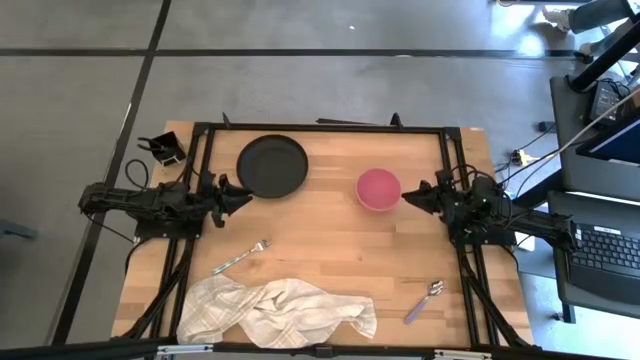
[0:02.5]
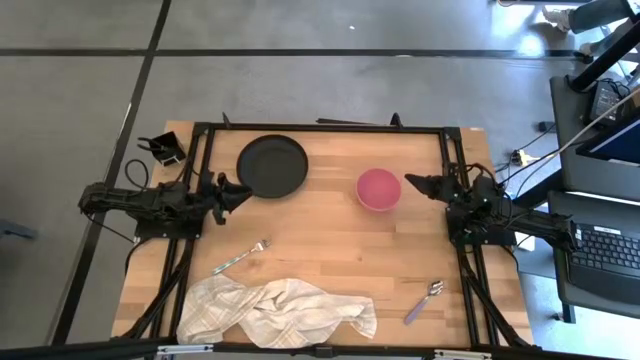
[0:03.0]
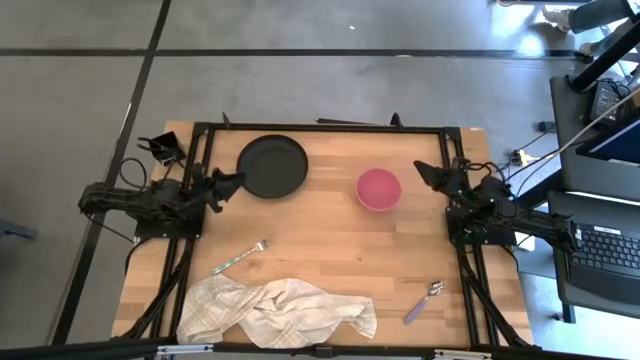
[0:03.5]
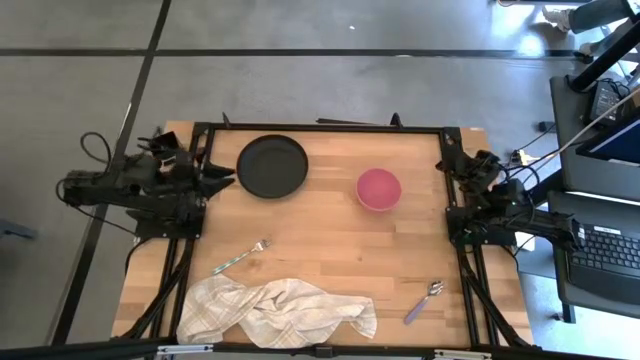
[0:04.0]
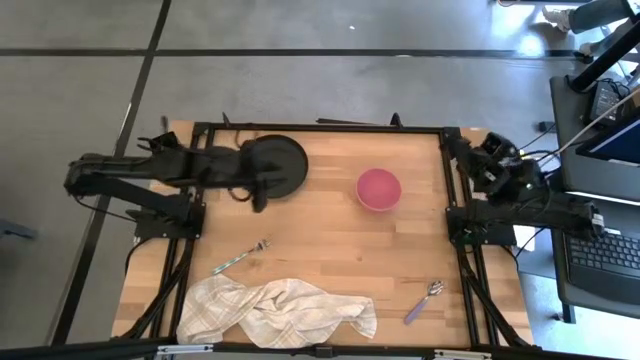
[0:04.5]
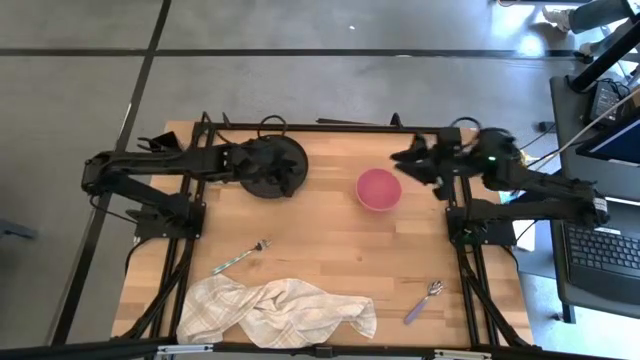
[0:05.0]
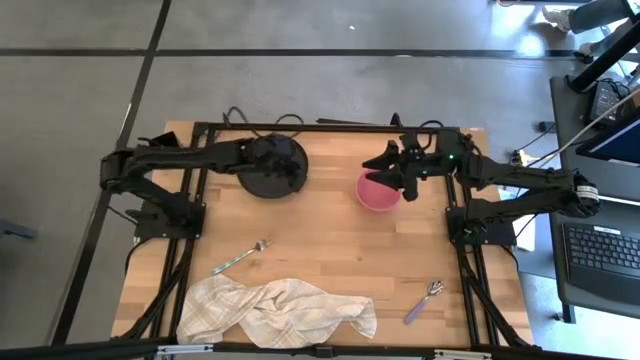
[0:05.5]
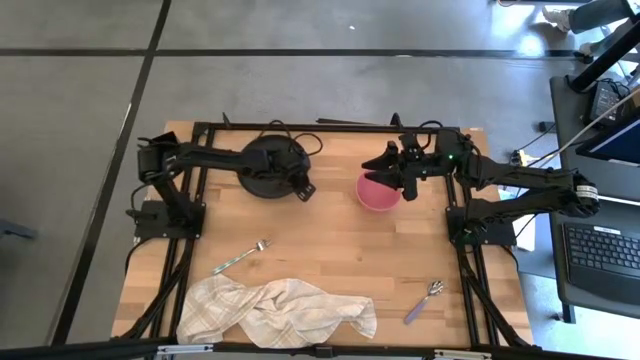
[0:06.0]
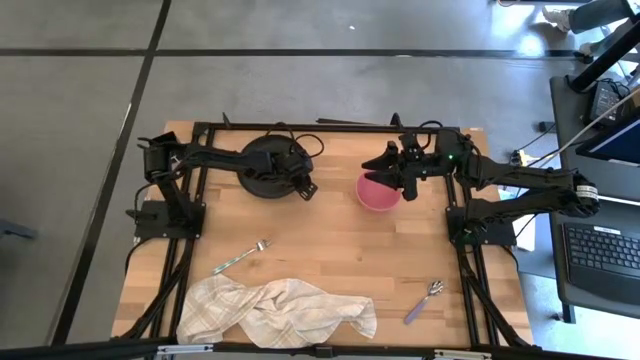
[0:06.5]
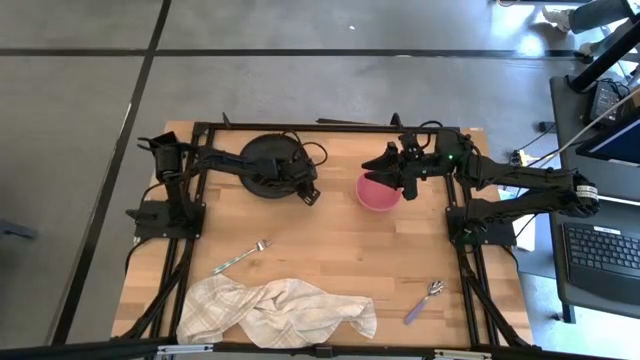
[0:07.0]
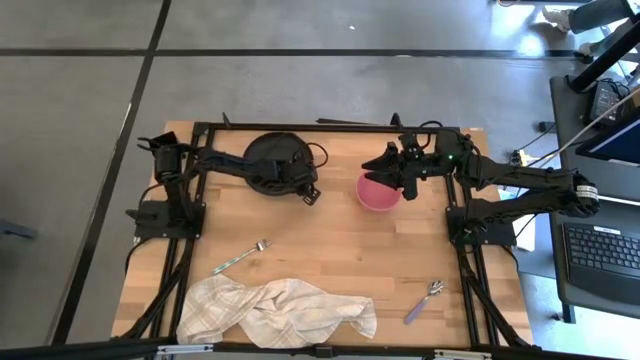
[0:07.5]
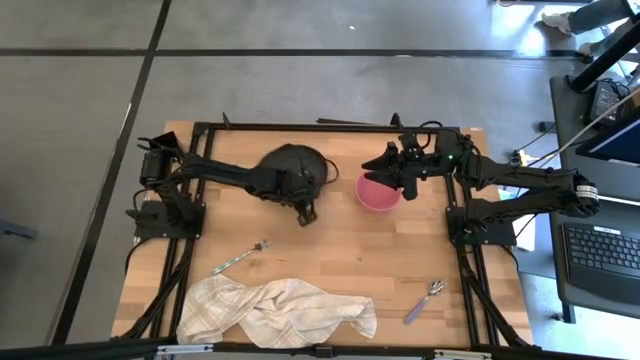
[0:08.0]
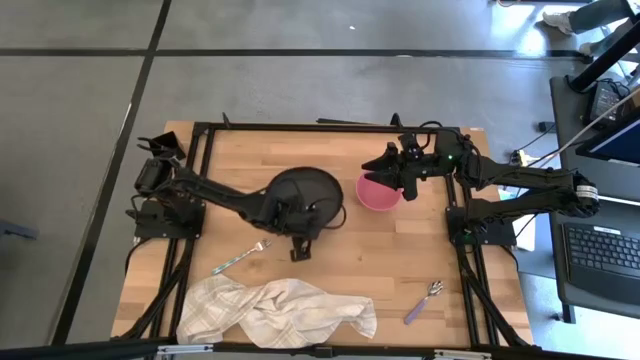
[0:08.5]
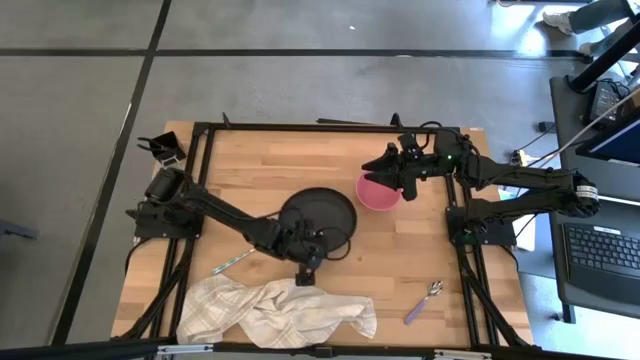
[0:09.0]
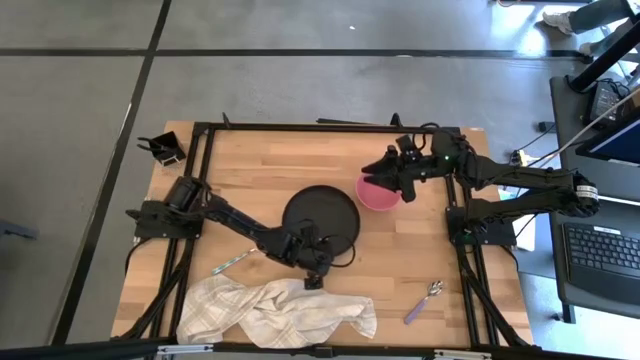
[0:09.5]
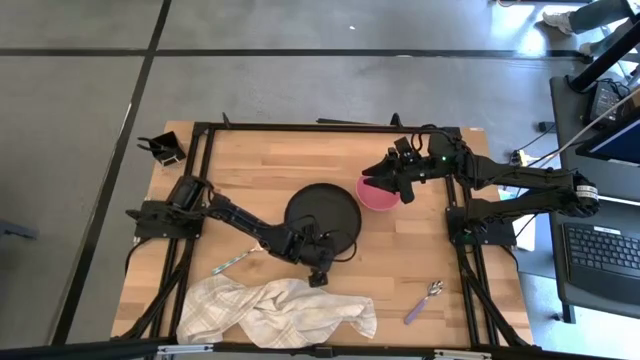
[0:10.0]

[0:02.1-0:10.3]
Task: Set table place
Move the black plate to the center of the table

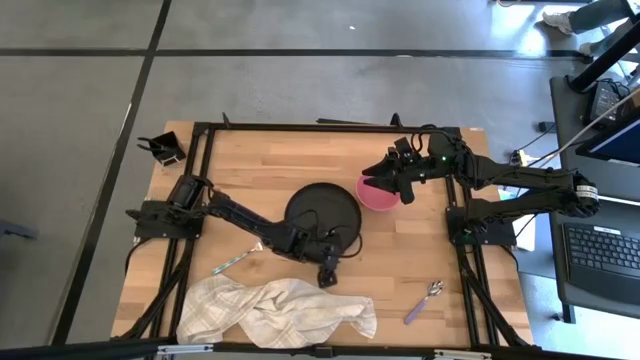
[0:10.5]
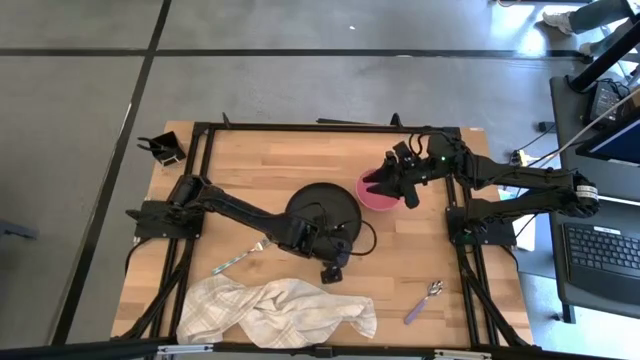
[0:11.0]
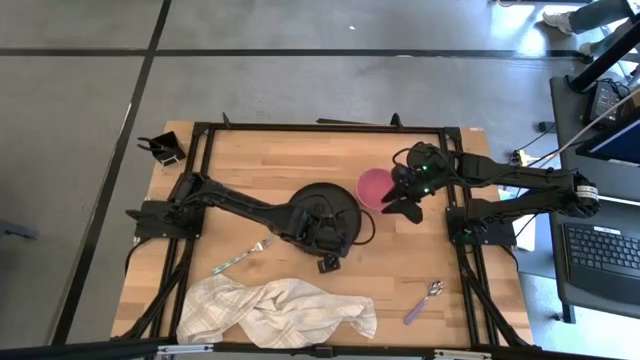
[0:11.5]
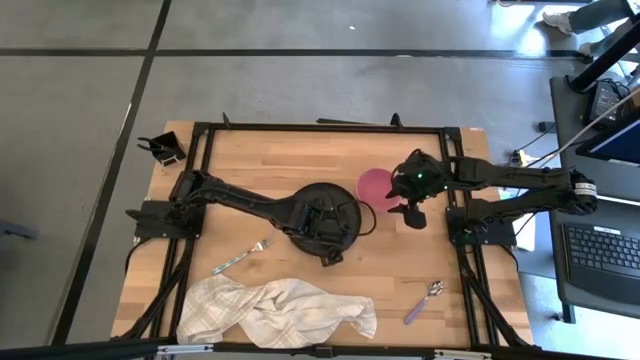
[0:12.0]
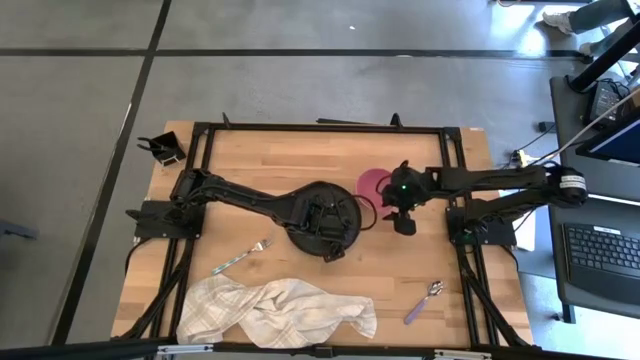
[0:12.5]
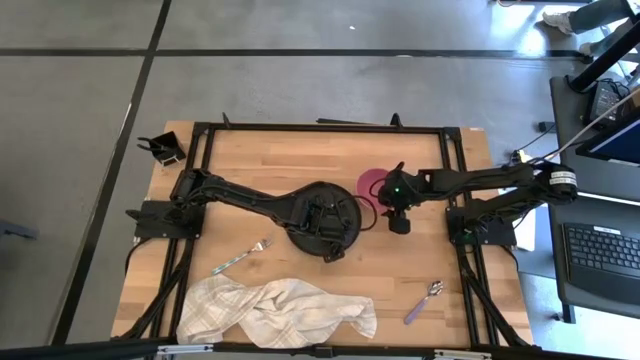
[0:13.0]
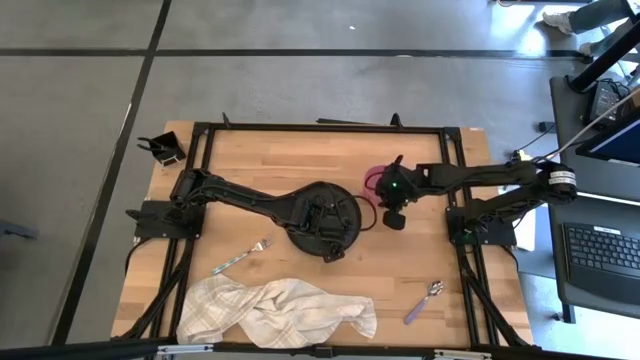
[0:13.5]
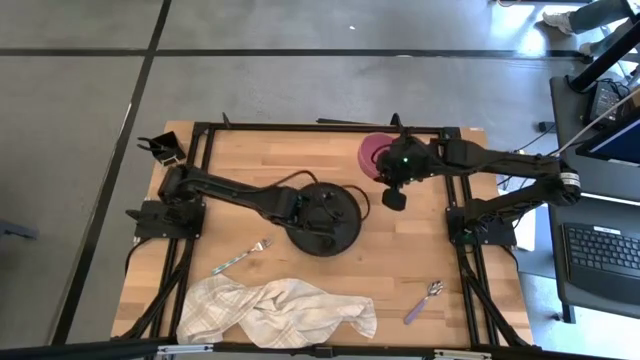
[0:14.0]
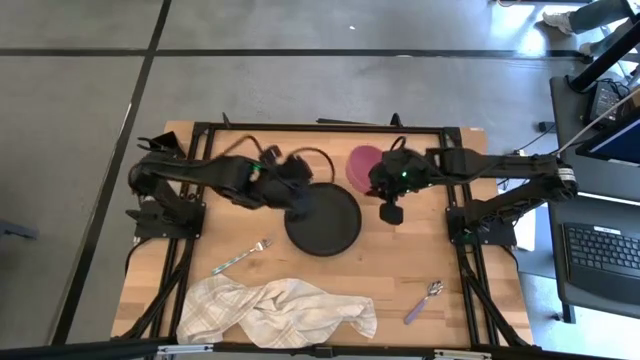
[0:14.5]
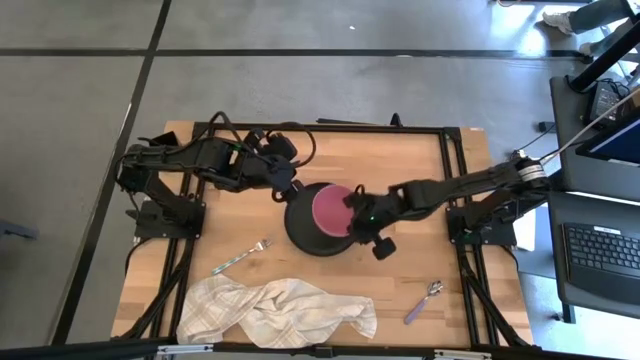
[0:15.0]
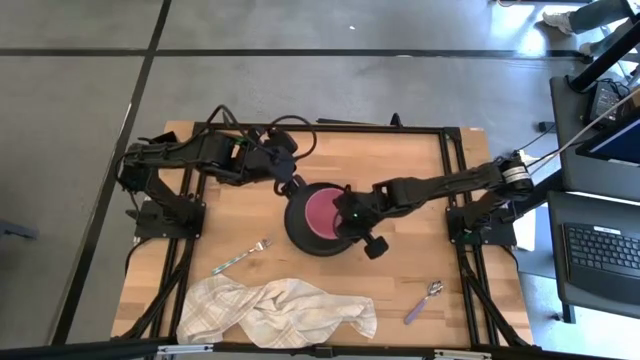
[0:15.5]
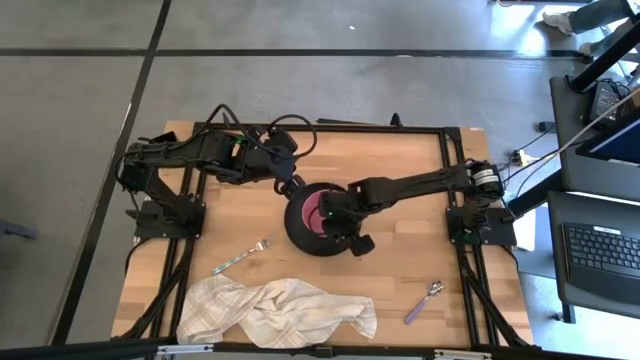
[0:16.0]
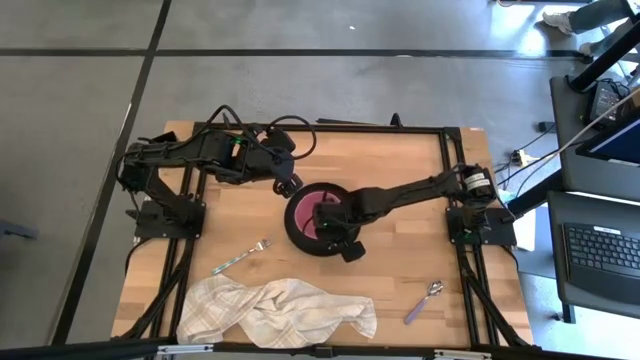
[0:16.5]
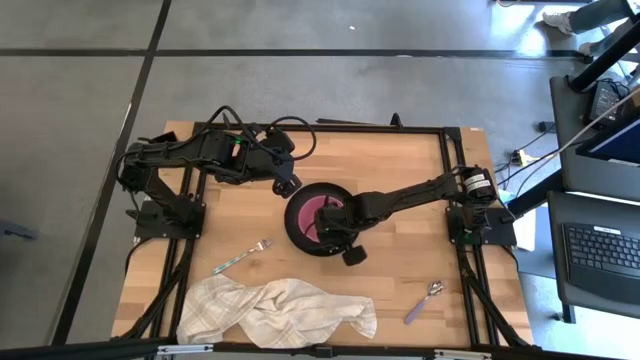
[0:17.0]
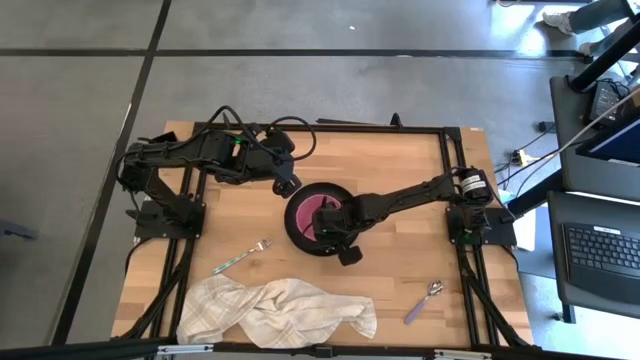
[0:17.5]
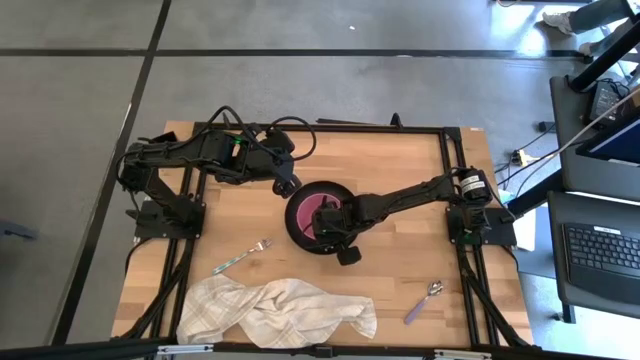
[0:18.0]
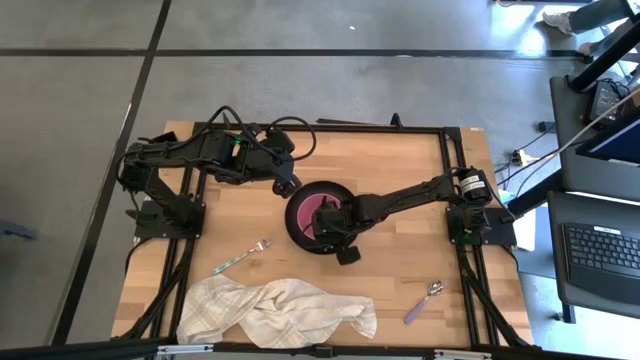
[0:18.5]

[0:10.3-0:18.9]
Put the pink bowl on top of the black plate

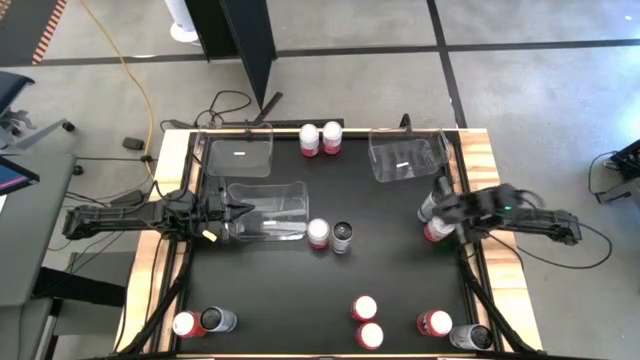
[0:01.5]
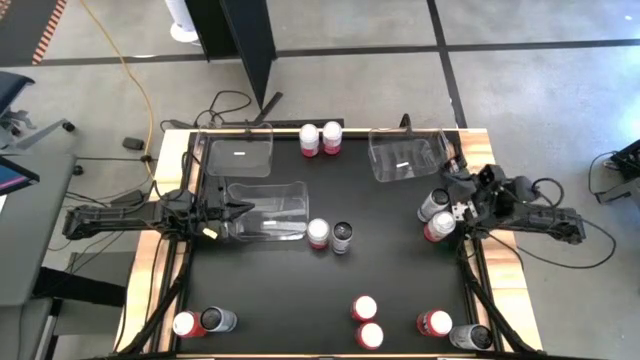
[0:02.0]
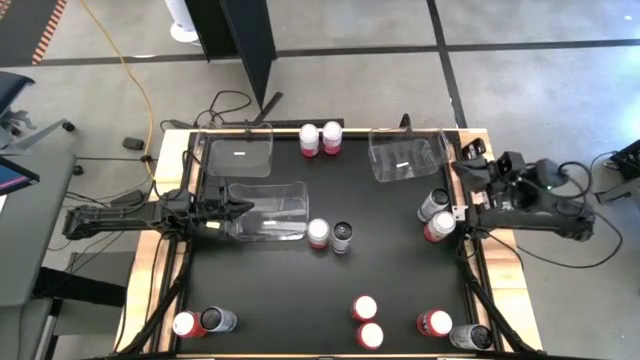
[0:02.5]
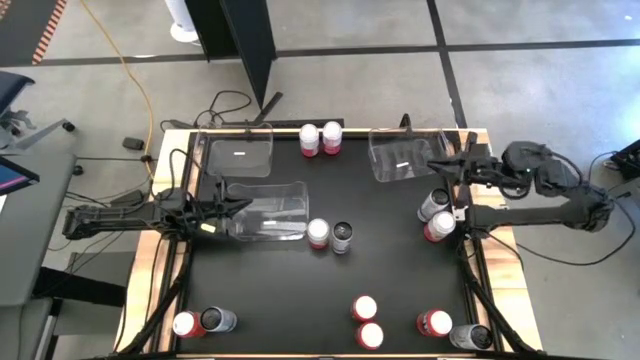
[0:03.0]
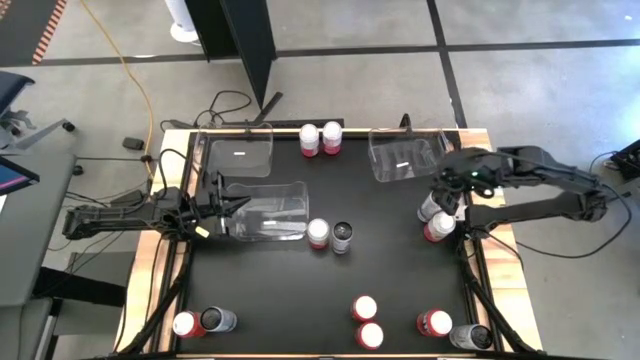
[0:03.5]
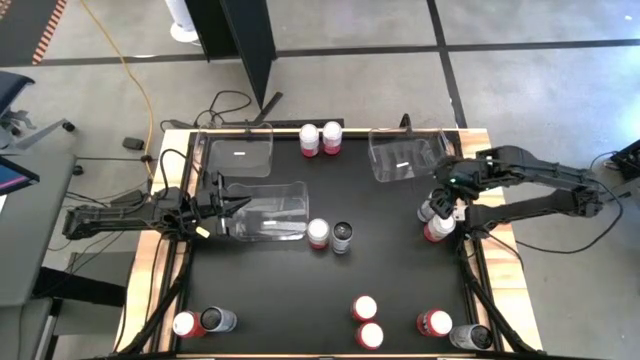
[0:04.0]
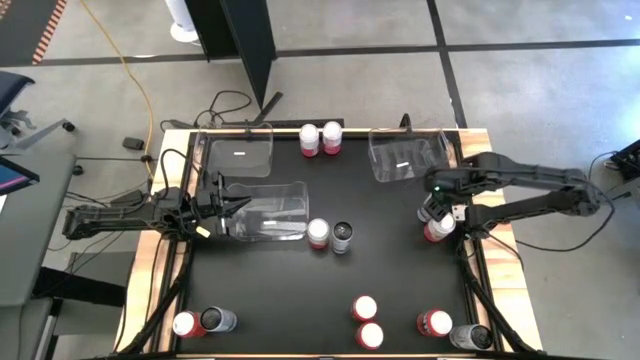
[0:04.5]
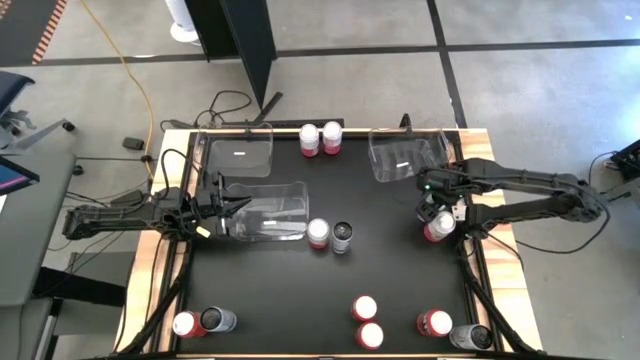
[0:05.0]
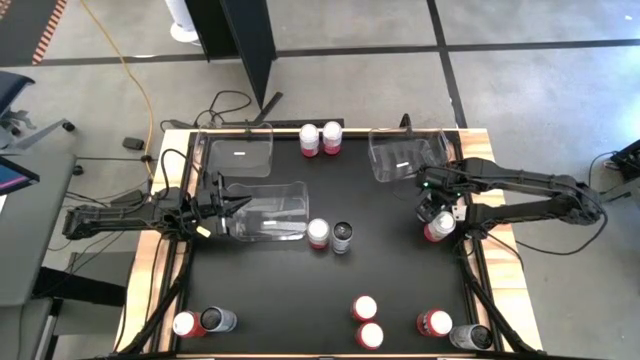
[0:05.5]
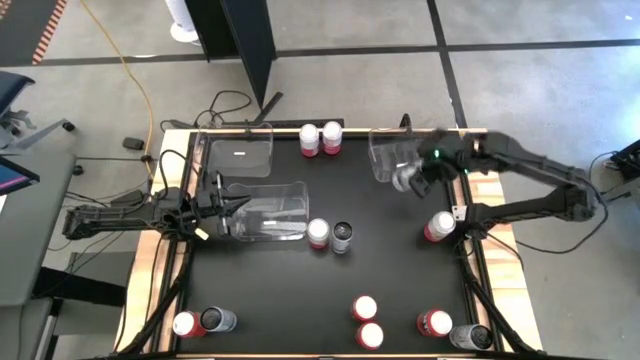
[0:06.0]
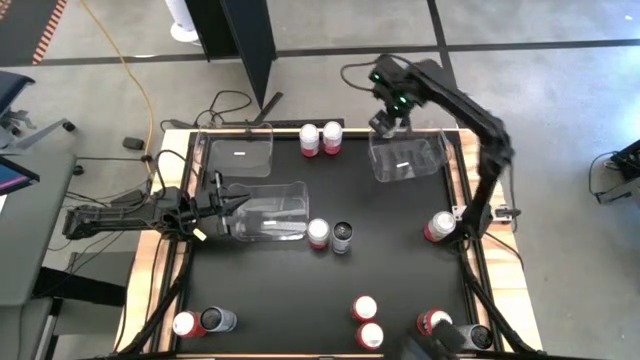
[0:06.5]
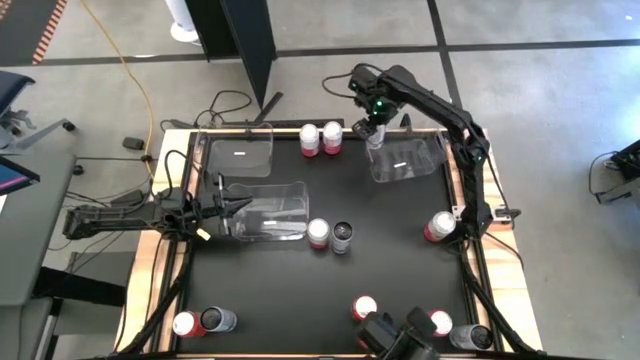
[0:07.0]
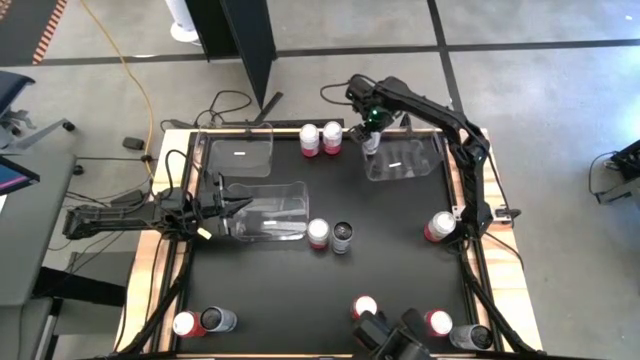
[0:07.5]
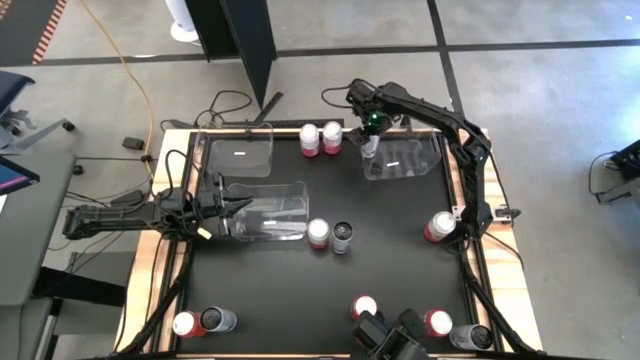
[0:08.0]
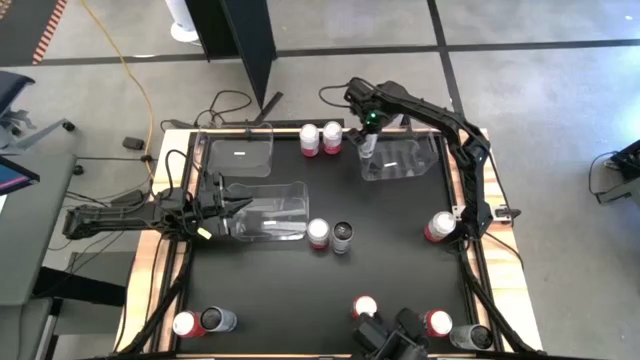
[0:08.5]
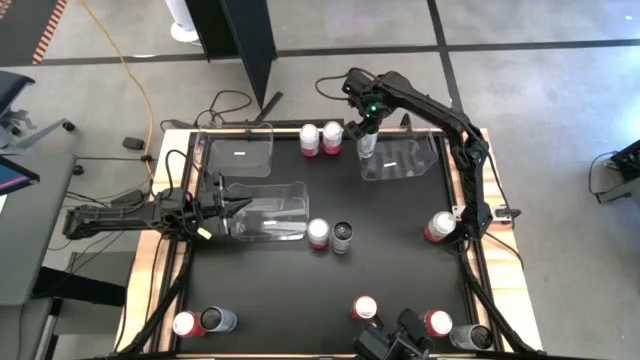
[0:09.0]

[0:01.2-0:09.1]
Task: Sort soda cans
Put the middle right white and blue soda can into the top right transparent bin
